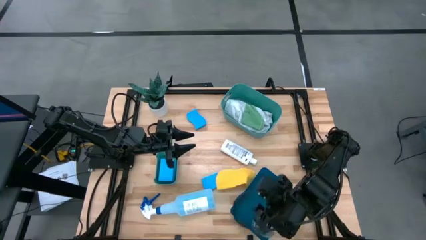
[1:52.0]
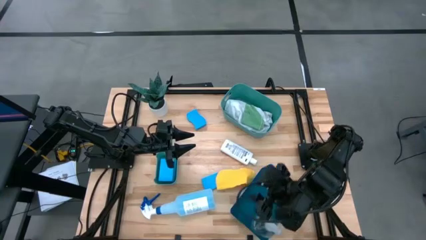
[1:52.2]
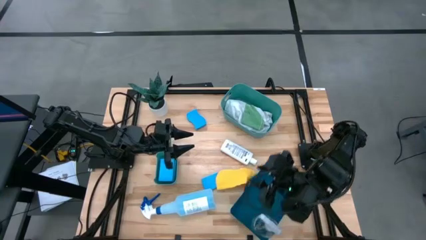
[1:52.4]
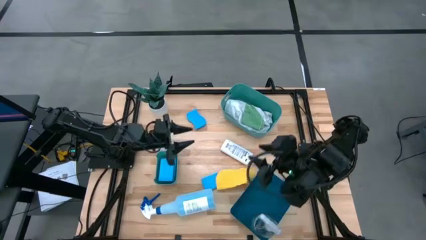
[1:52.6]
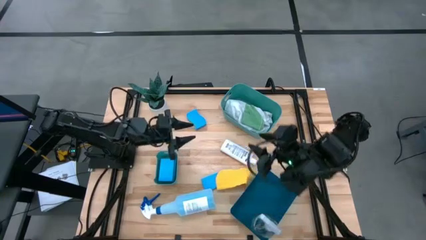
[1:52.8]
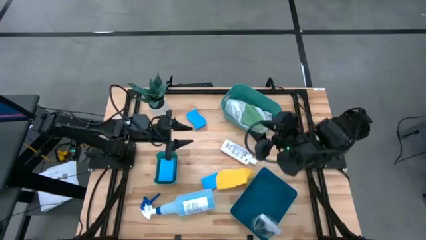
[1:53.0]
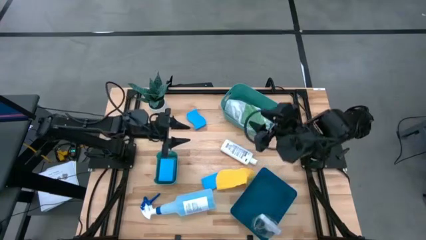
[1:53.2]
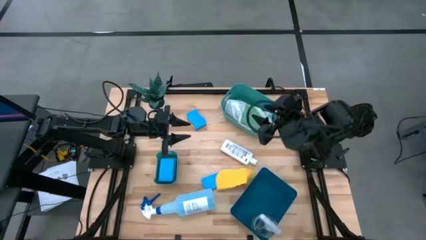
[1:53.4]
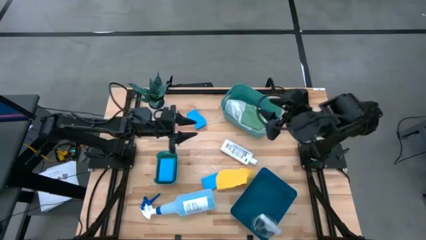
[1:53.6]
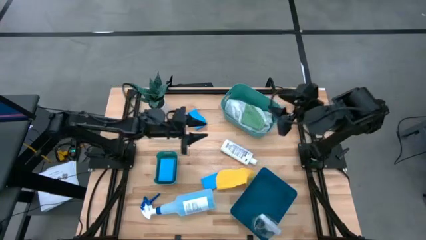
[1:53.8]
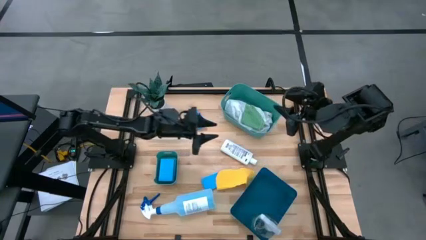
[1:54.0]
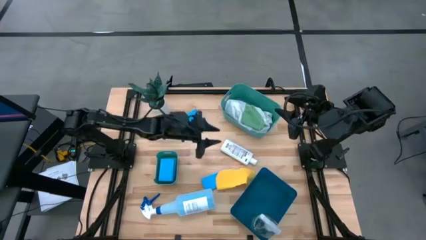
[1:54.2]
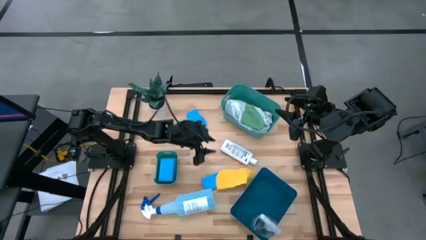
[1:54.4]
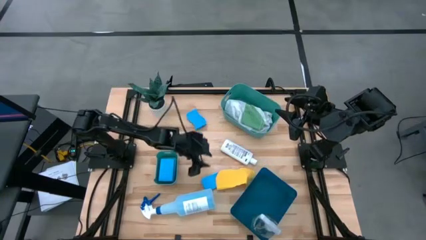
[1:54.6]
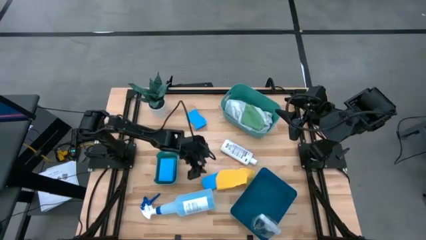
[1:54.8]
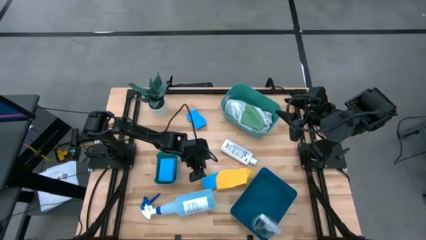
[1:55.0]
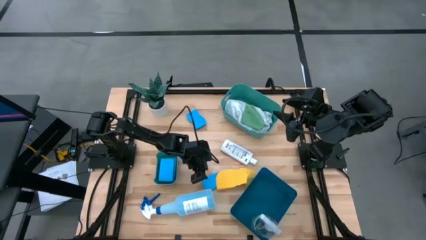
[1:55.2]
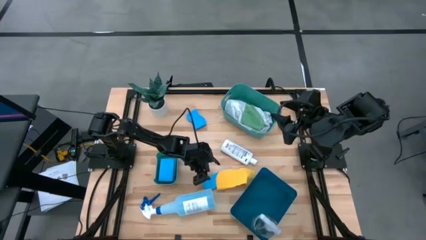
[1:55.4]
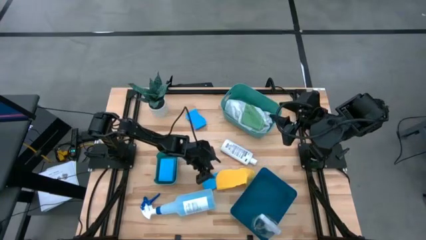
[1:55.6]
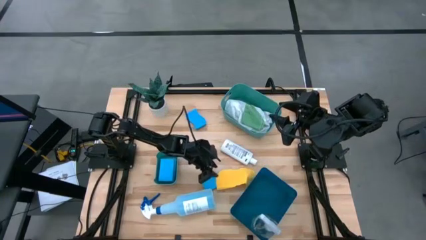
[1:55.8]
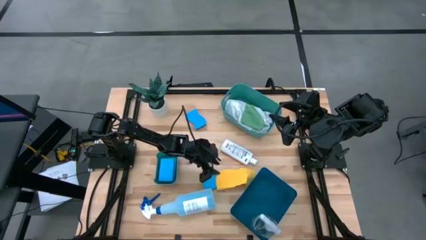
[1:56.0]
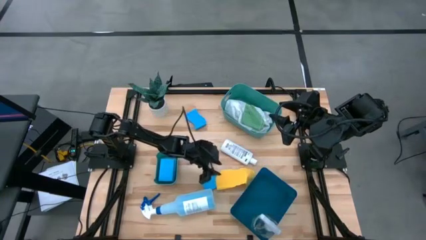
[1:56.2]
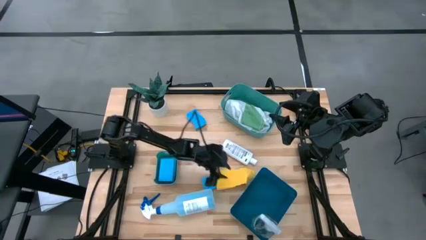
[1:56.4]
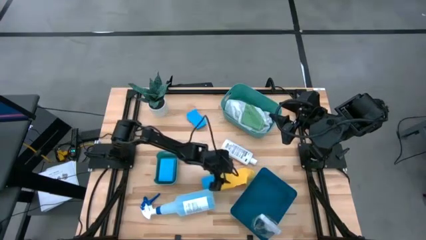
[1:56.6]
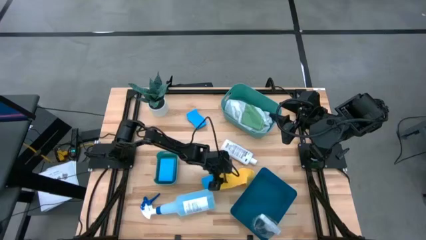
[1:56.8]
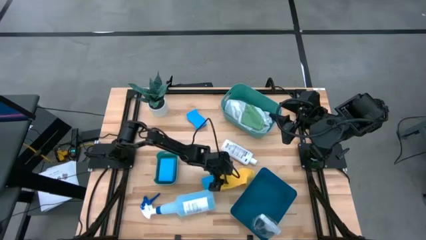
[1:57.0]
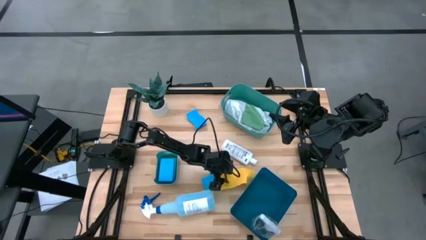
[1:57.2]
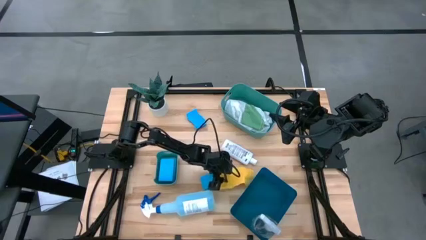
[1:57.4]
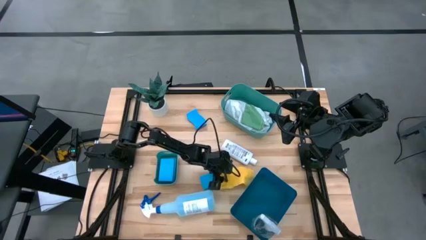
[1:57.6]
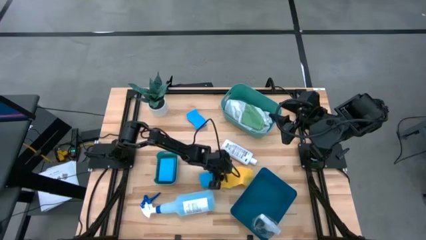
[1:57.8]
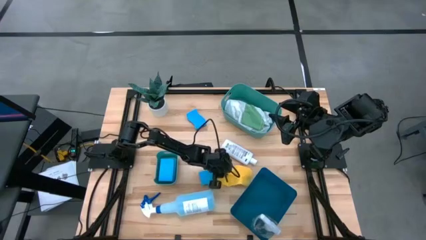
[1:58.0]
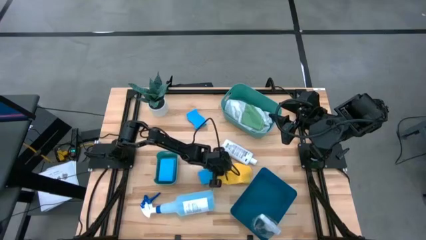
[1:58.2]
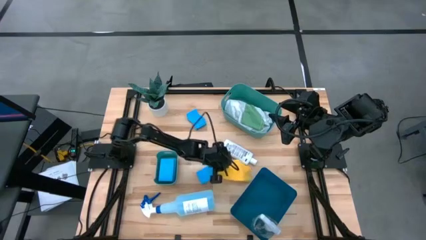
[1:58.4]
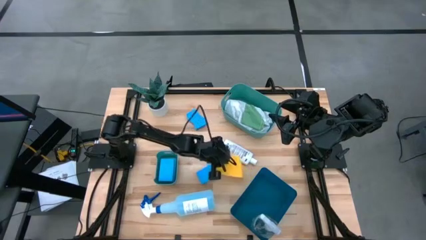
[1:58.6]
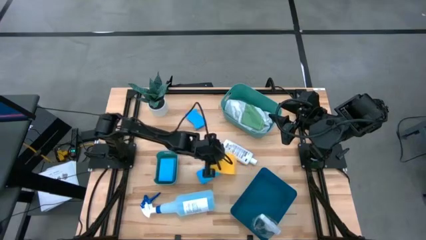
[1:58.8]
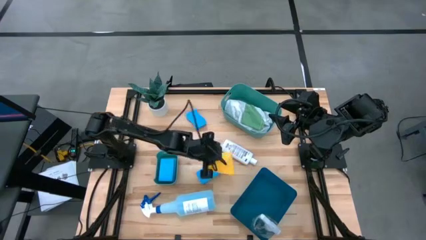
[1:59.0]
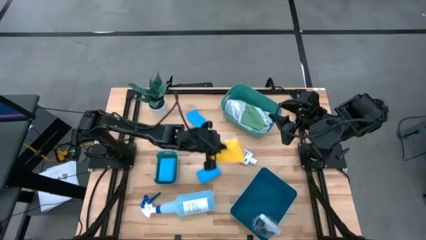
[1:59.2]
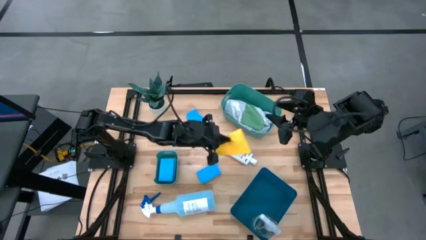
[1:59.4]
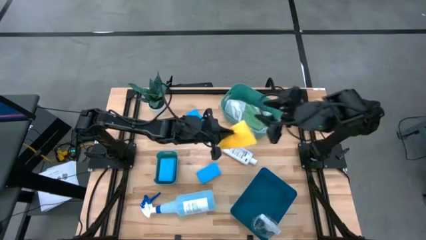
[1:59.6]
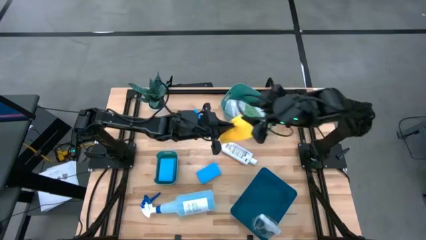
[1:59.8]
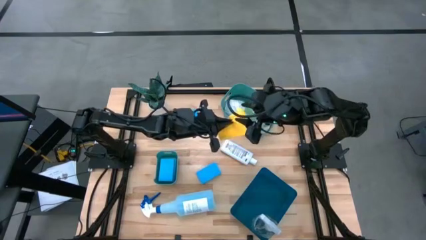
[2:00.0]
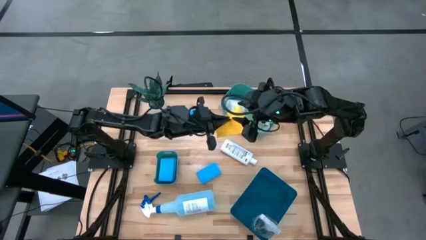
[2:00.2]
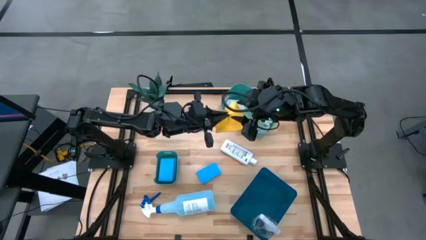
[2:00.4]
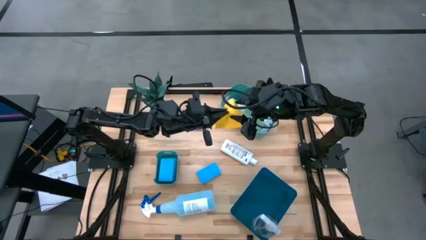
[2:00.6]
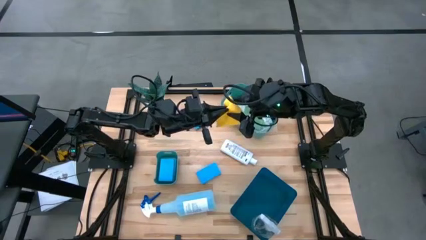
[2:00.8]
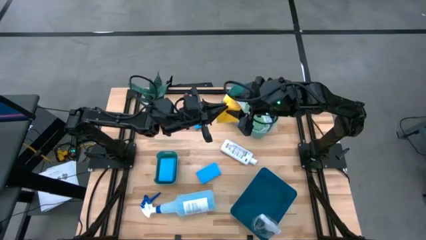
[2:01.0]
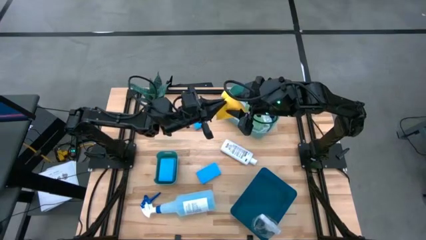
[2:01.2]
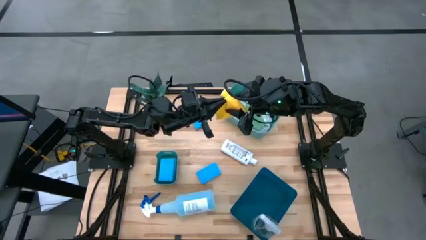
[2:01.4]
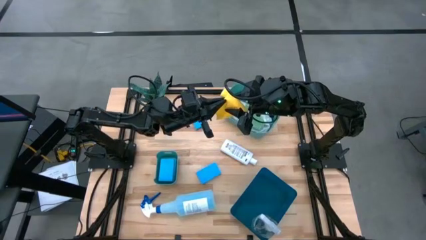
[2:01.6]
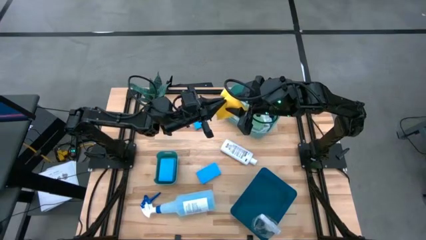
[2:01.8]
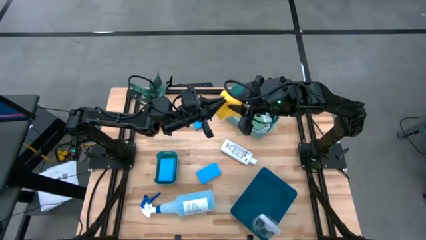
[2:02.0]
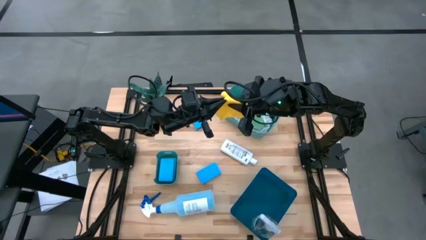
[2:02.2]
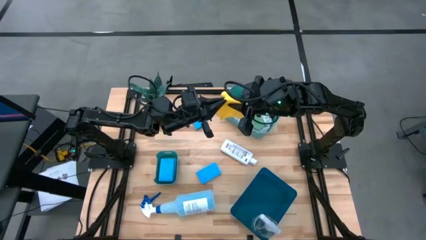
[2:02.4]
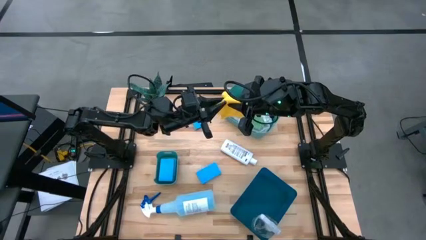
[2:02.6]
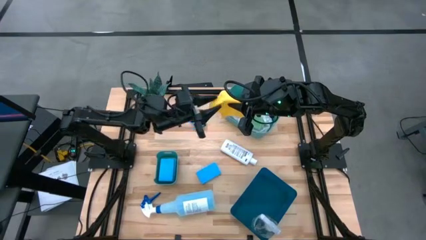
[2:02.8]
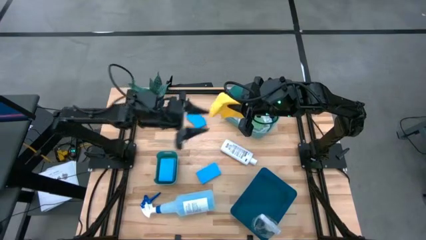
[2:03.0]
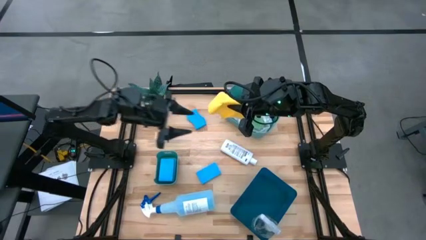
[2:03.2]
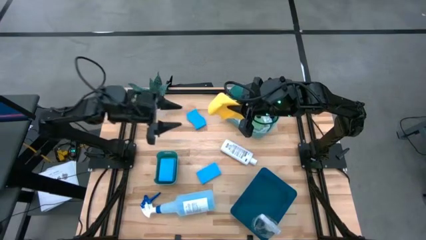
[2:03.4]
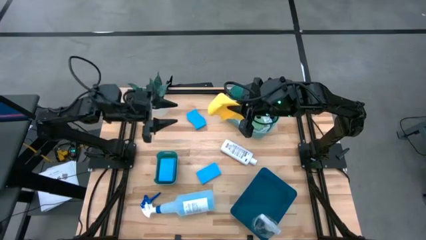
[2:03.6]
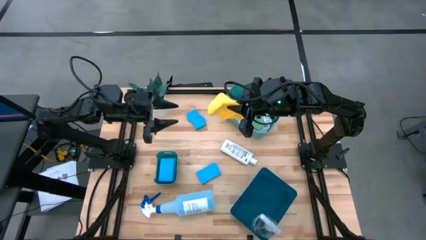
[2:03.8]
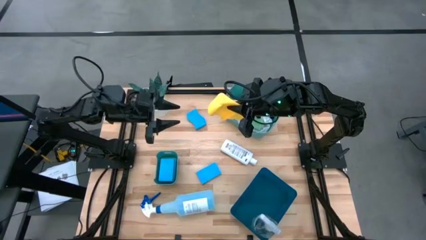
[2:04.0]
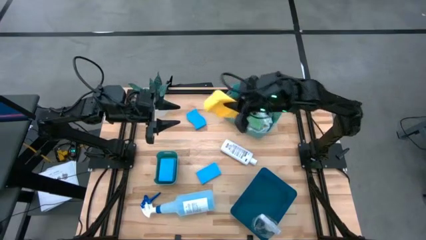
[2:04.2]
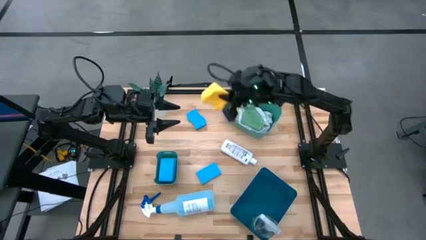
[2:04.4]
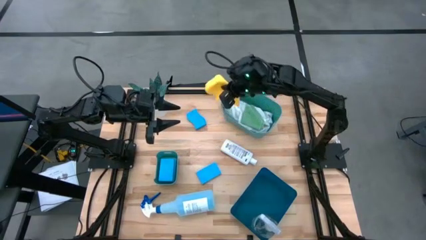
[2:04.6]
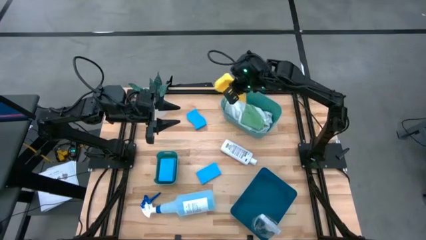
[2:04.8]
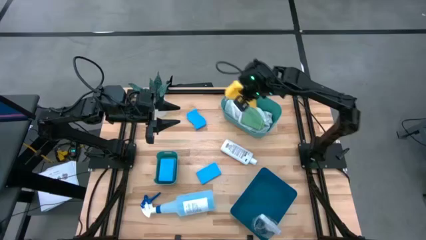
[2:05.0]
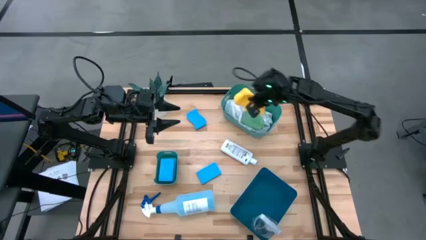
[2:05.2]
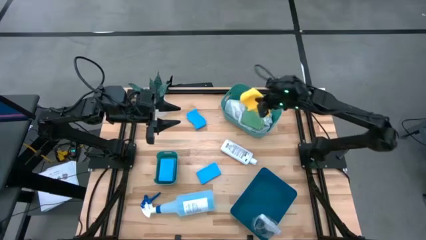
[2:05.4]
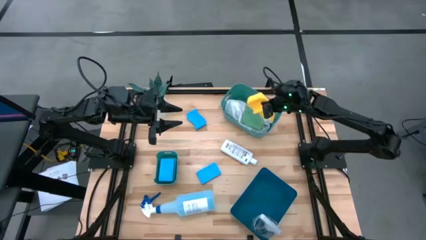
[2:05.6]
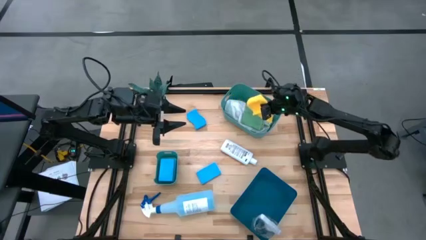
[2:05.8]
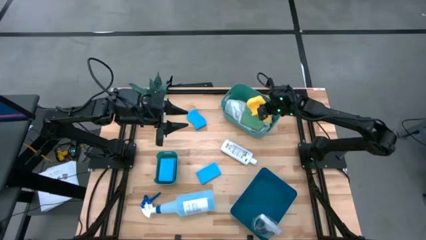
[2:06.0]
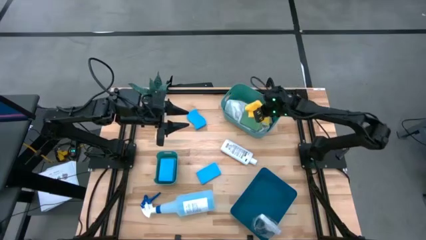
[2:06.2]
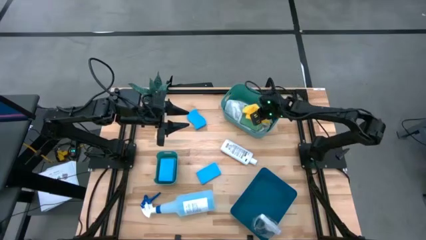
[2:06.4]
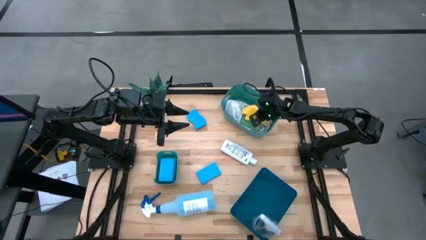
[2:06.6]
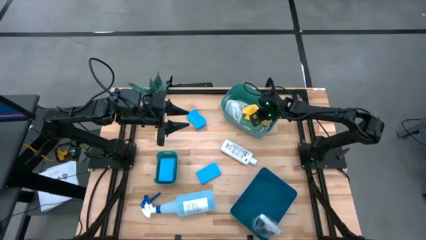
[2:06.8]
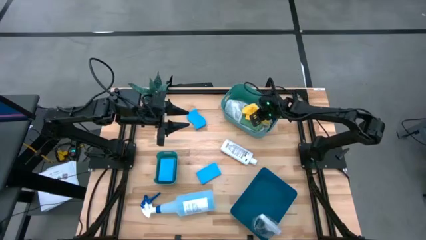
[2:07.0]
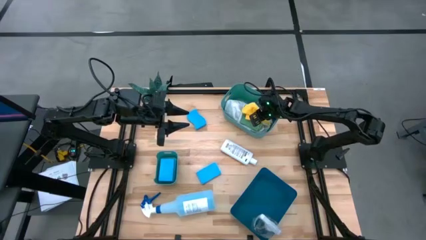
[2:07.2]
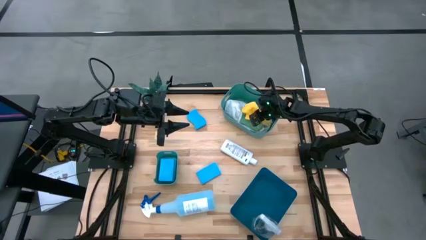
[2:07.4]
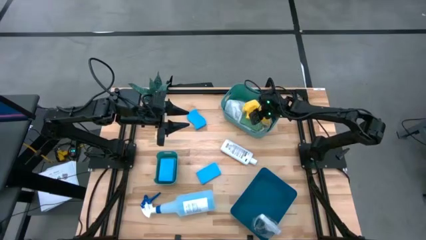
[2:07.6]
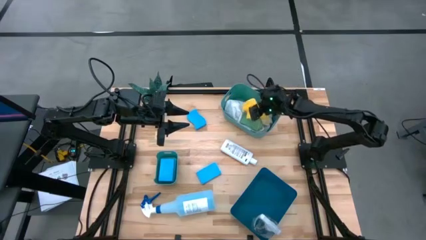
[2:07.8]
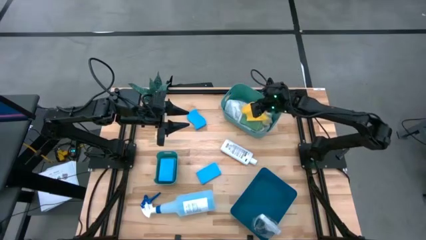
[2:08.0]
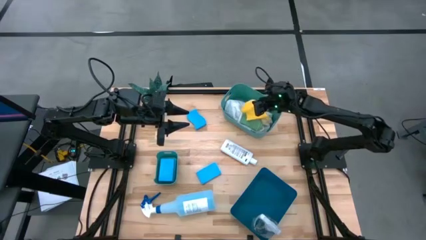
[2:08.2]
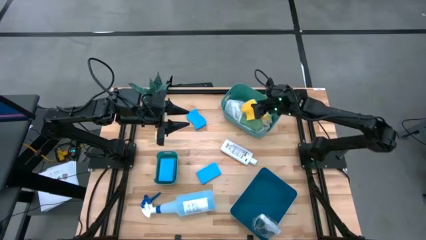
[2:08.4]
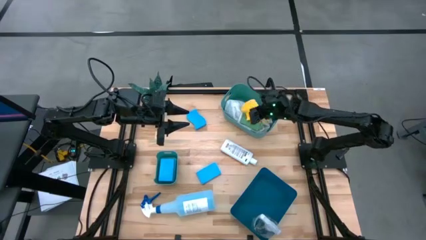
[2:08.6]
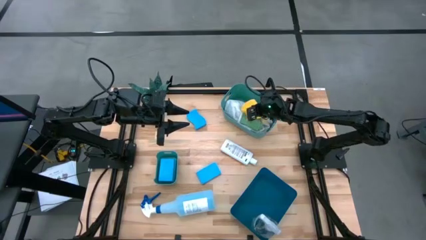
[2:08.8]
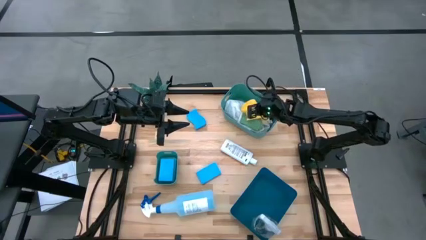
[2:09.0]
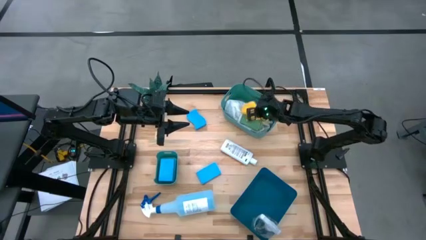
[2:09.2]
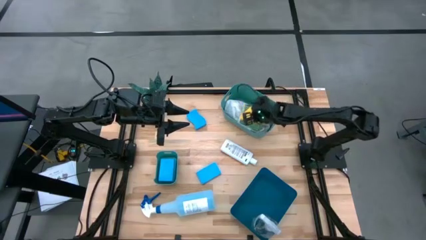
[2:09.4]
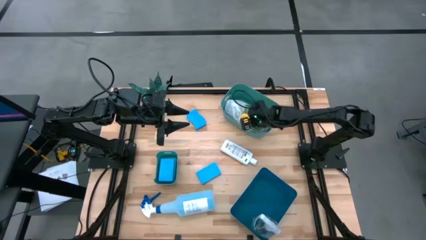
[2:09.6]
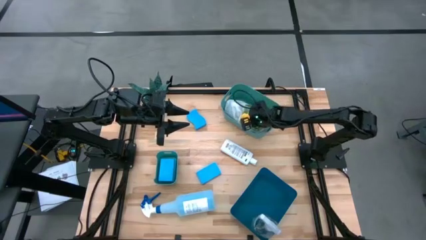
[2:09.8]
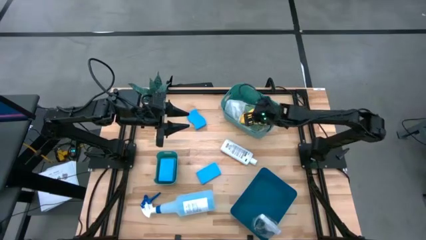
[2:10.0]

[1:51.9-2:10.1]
Task: Pick & Place Kitchen Items
Put the yellow towel into the big green bin
